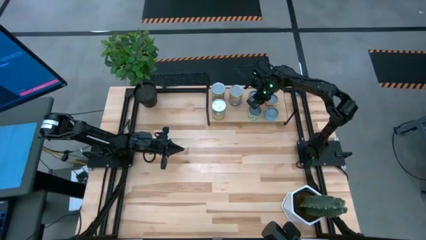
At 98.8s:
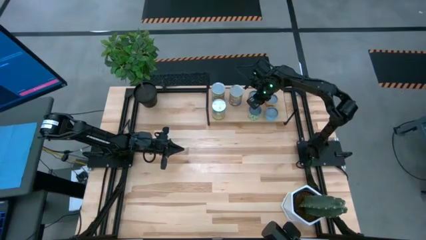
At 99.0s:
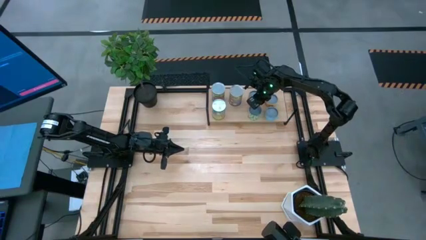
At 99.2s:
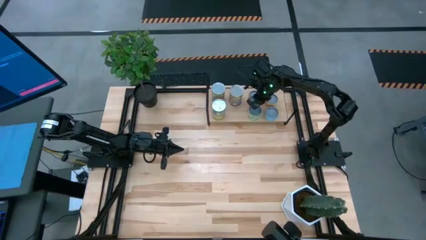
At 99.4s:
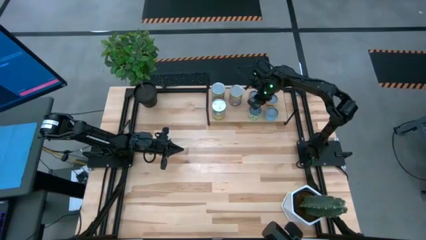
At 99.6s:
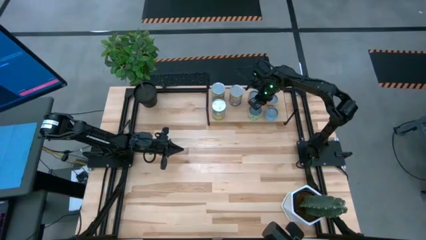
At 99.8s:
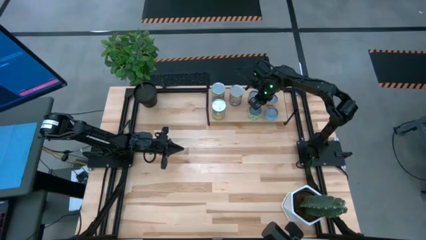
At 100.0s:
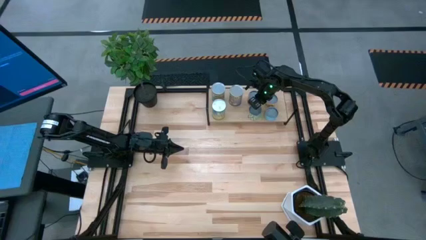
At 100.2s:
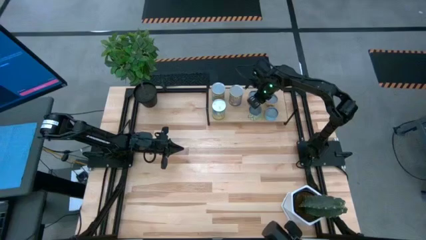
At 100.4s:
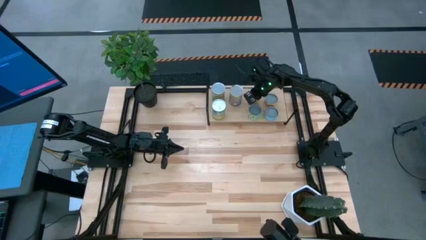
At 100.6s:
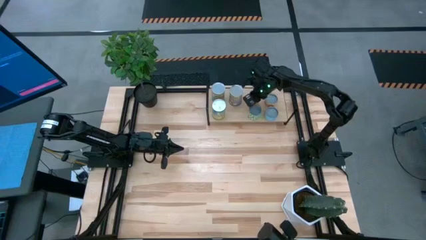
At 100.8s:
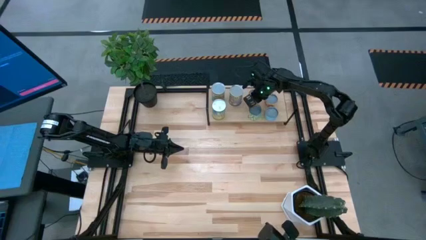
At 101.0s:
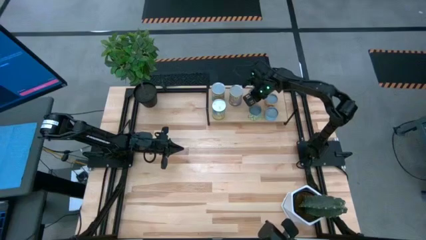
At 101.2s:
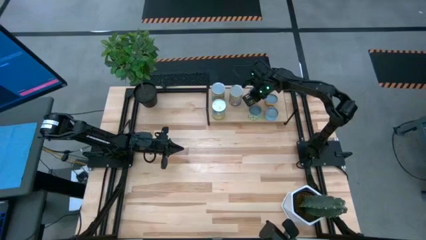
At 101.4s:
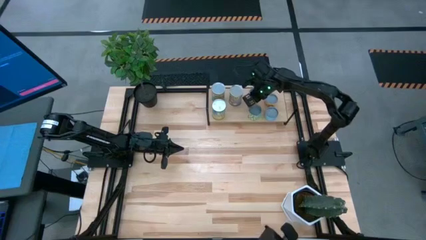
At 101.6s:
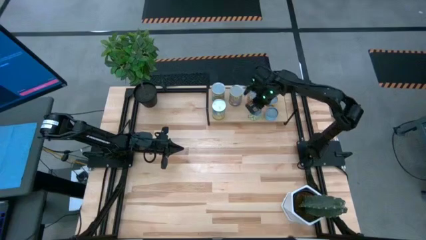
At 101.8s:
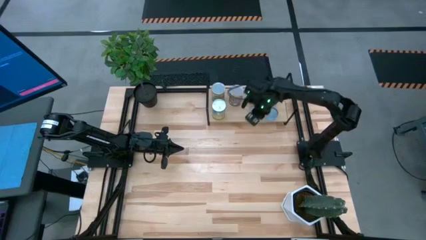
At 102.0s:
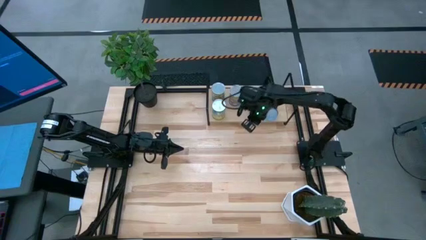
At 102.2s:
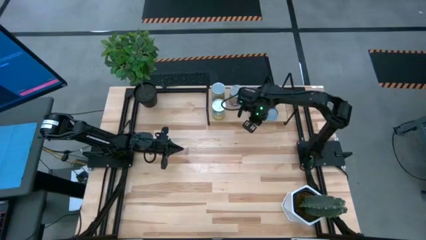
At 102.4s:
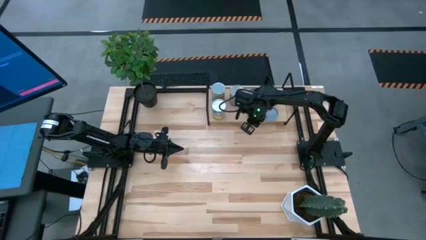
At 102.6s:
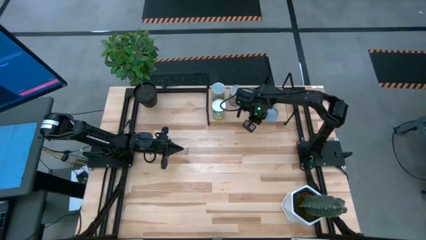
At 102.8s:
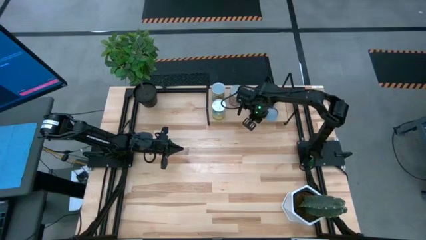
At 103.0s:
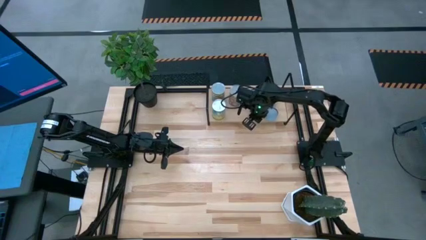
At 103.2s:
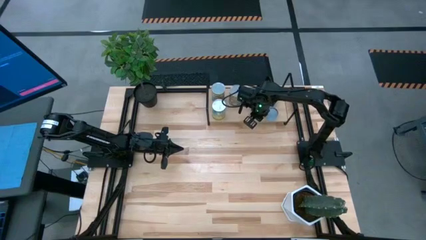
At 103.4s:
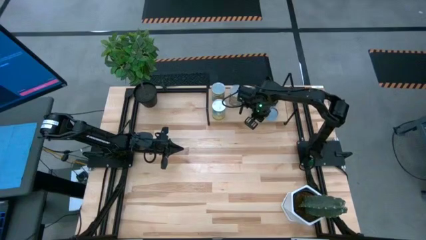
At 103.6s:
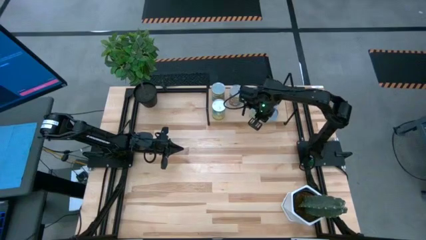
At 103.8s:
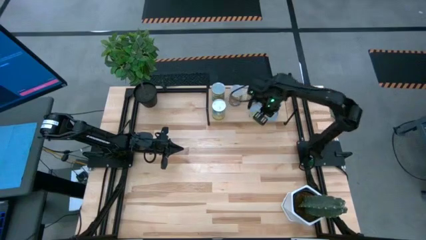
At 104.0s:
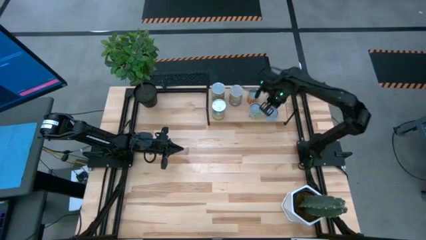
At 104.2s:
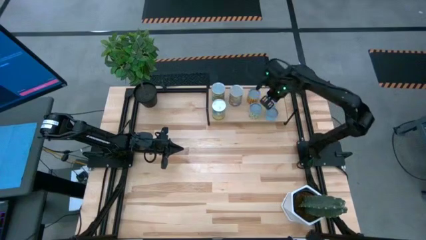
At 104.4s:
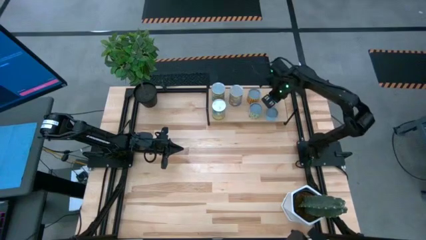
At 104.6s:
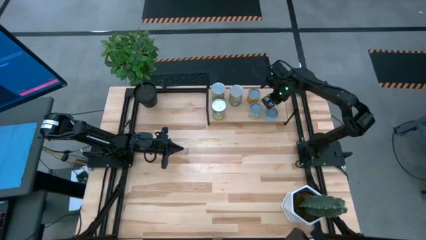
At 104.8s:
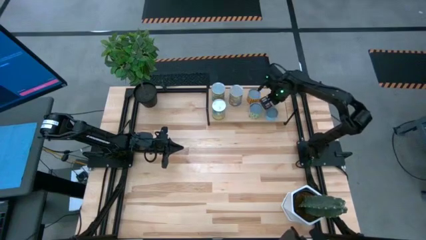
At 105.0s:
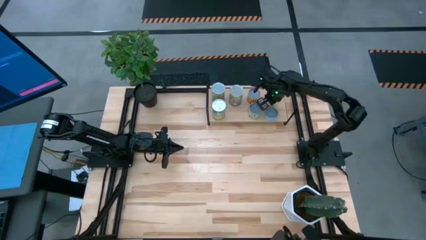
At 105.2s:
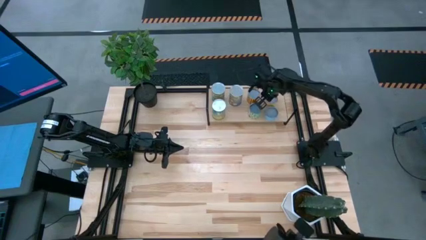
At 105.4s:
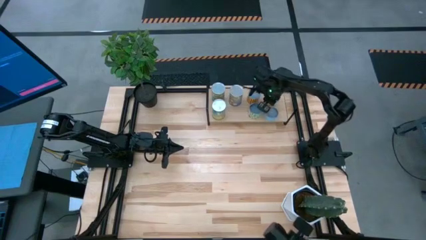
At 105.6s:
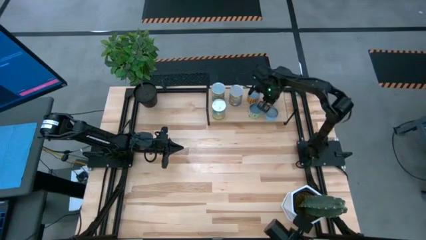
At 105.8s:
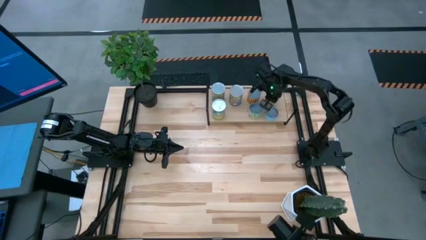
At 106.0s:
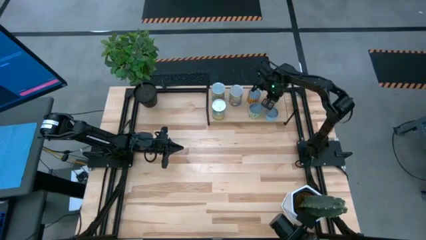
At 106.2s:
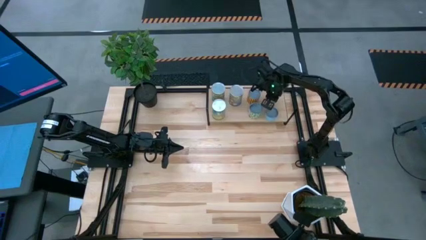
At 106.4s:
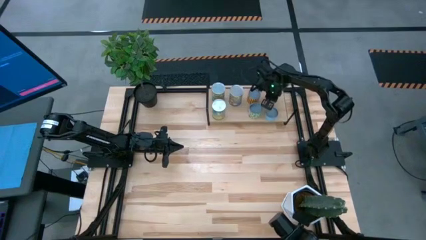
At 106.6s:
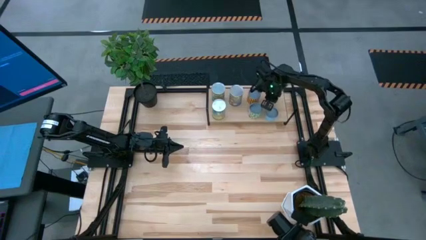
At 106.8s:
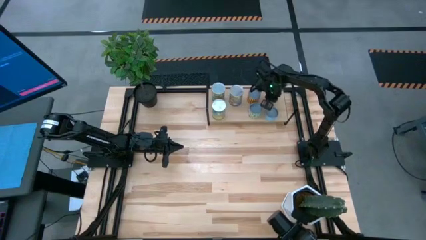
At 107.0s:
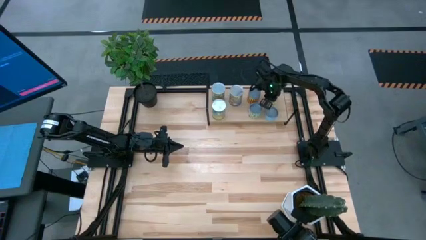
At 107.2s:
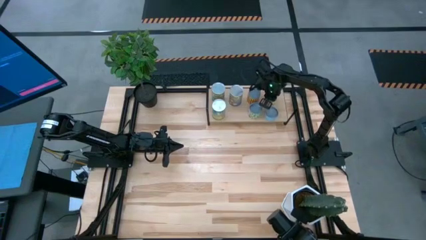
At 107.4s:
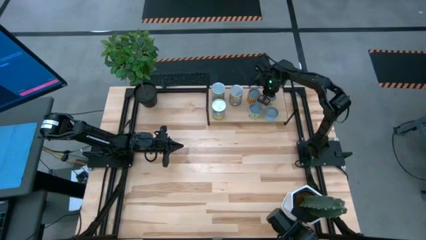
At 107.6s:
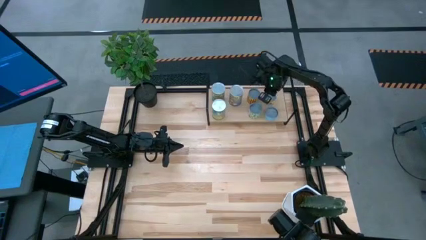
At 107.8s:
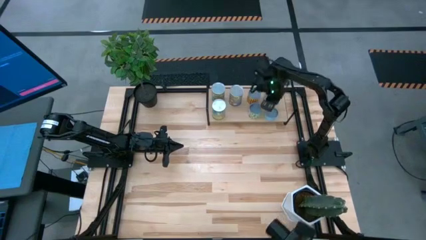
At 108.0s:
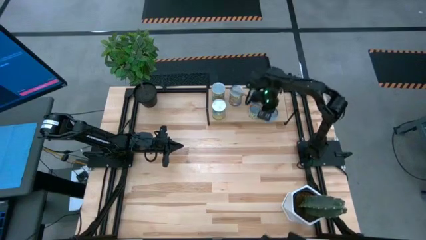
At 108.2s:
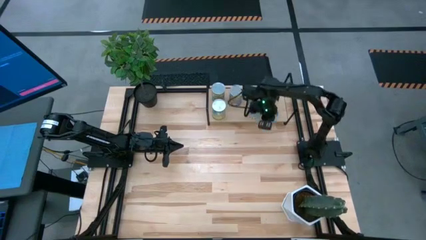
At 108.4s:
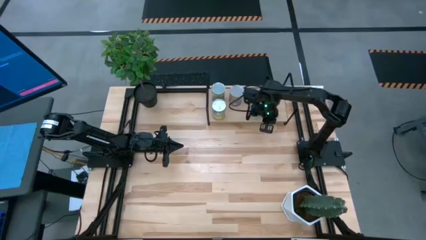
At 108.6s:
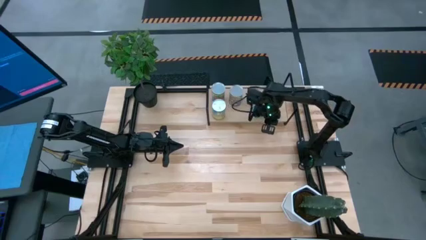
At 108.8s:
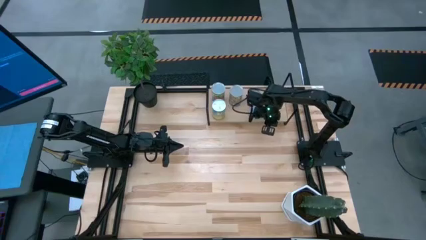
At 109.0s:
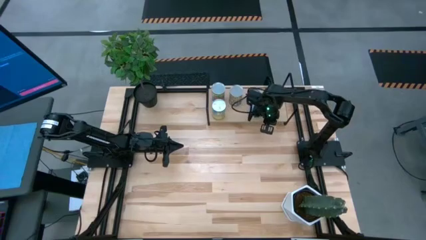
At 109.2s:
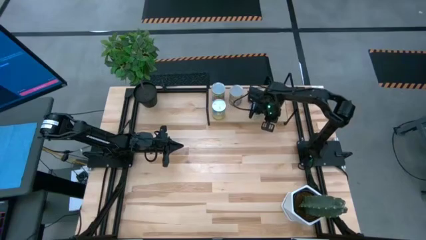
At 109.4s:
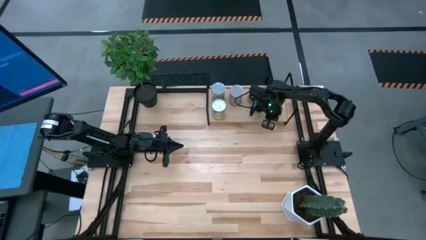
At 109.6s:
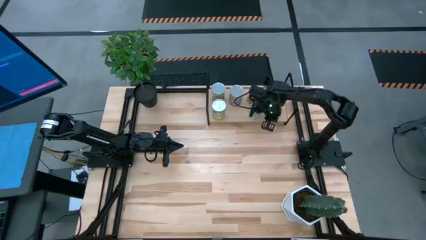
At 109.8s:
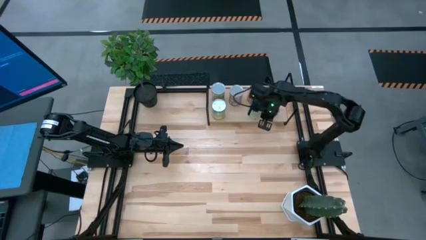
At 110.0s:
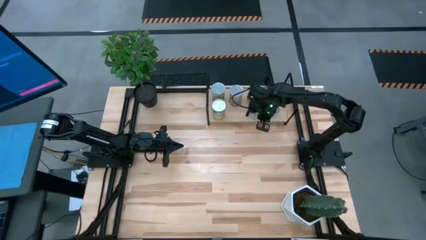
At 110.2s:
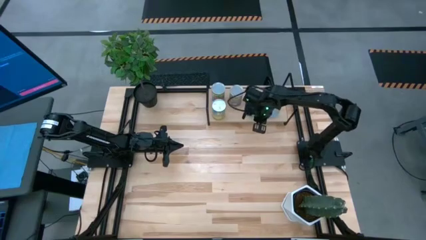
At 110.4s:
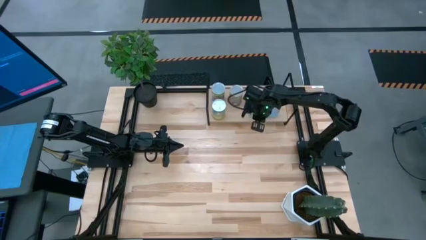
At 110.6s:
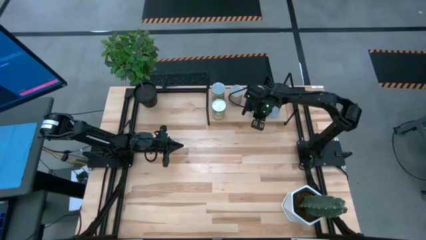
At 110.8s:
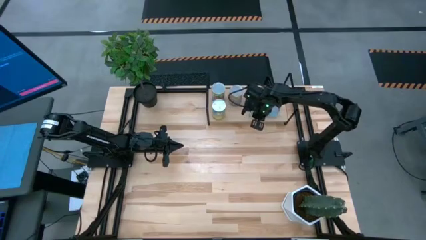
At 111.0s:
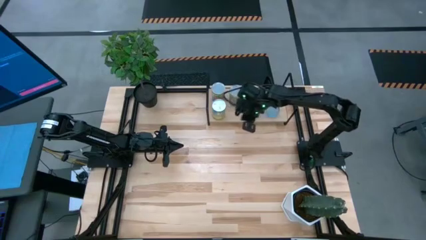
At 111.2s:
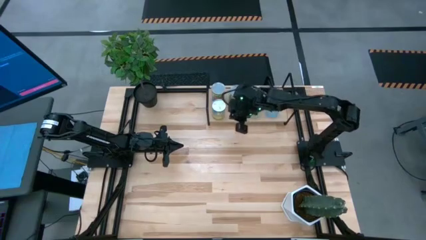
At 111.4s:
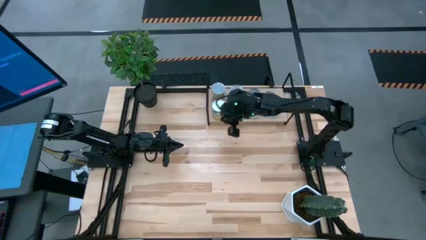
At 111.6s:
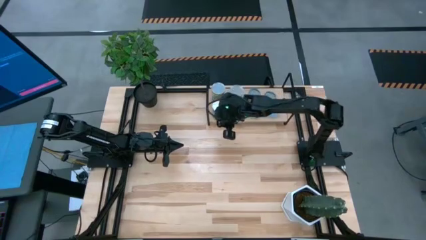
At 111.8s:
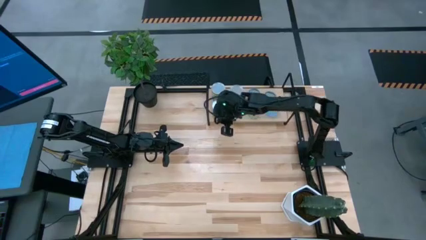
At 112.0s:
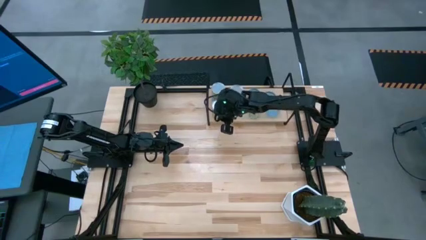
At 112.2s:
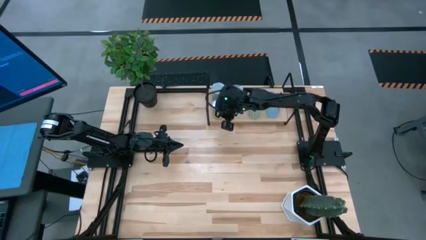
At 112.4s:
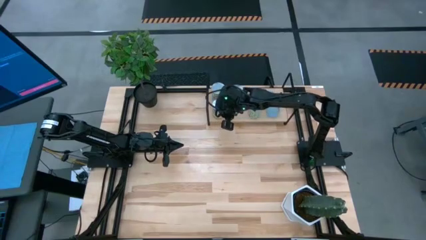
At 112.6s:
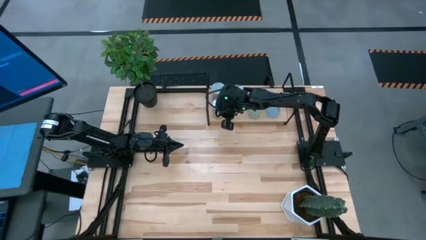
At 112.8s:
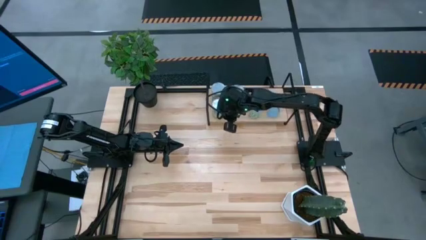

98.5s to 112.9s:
Task: Pick and place cans onto a shelf
Adjust the canned goods on the shelf
